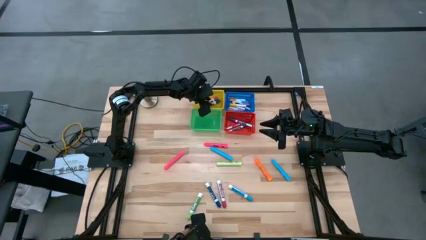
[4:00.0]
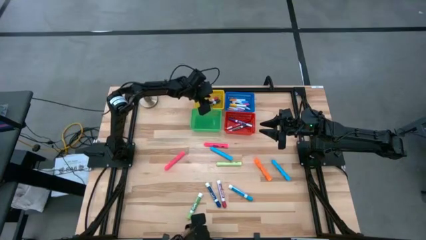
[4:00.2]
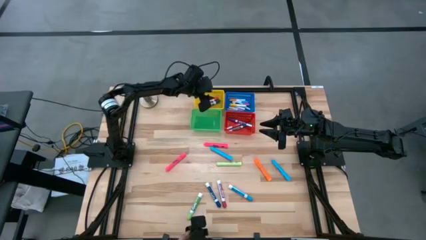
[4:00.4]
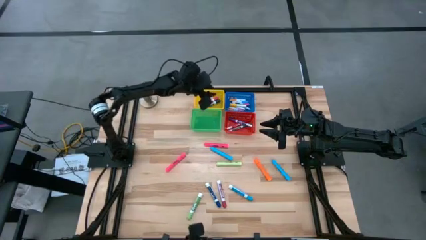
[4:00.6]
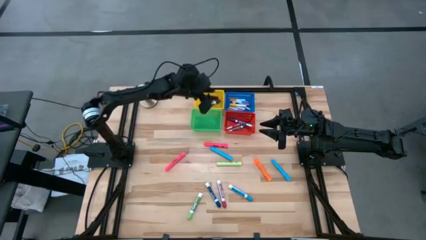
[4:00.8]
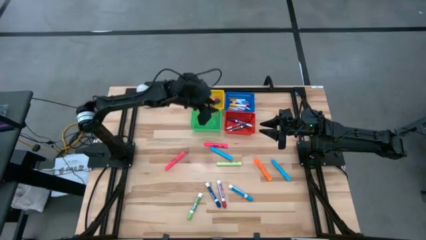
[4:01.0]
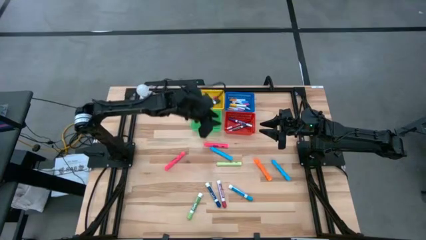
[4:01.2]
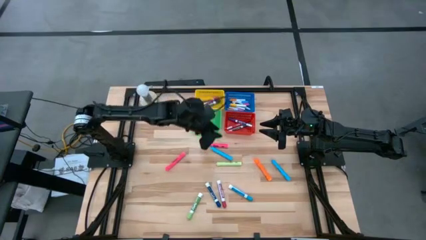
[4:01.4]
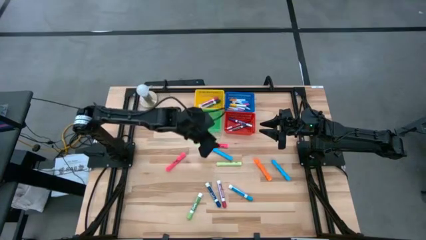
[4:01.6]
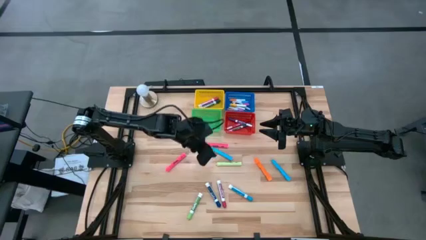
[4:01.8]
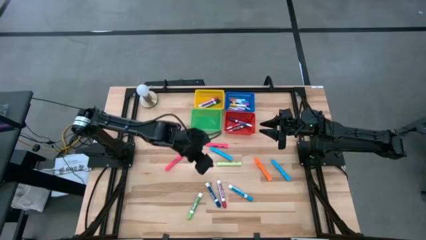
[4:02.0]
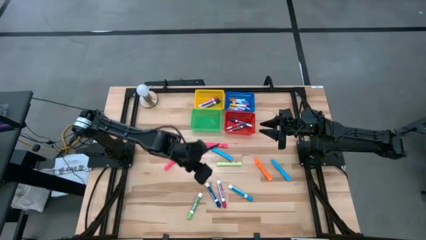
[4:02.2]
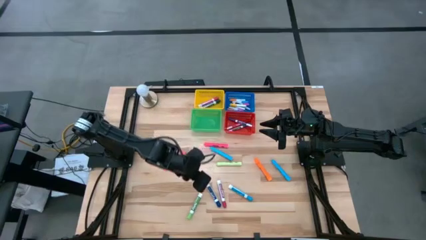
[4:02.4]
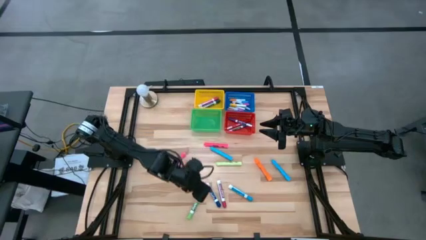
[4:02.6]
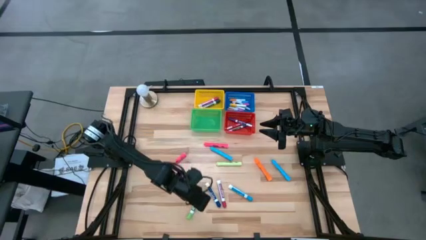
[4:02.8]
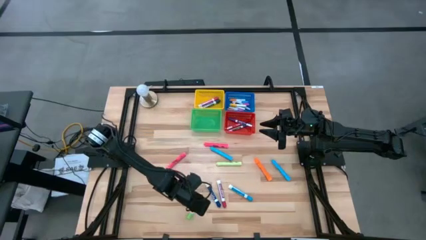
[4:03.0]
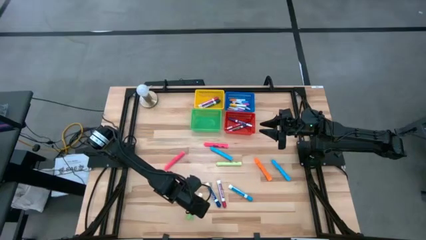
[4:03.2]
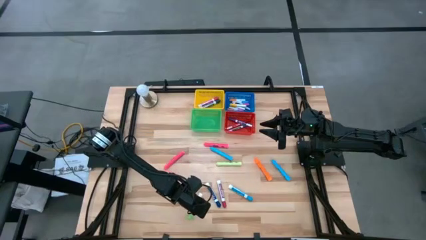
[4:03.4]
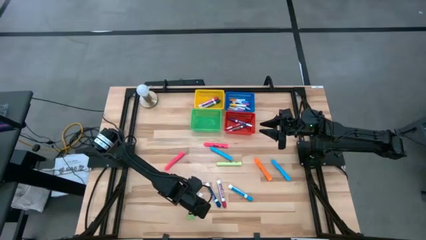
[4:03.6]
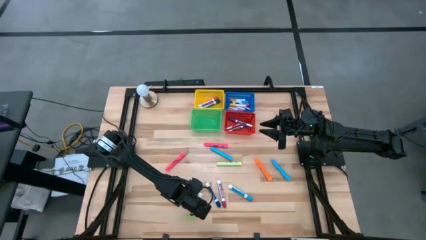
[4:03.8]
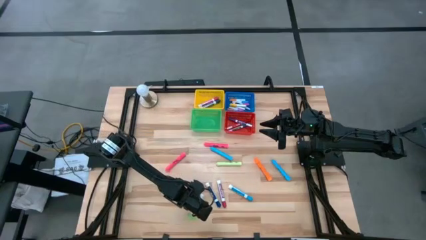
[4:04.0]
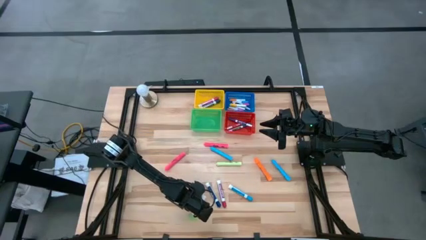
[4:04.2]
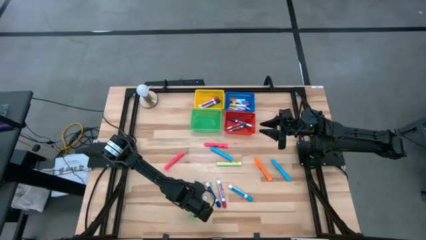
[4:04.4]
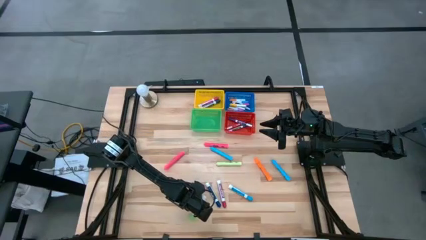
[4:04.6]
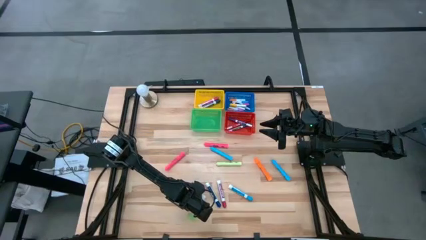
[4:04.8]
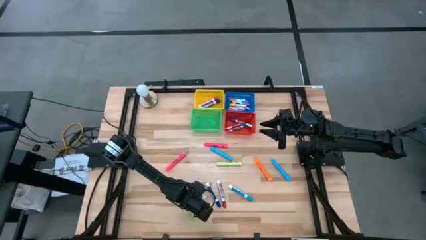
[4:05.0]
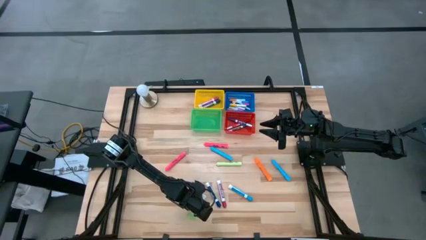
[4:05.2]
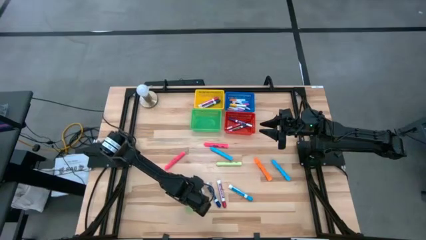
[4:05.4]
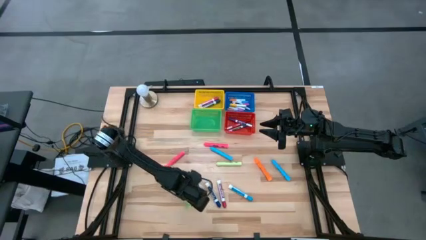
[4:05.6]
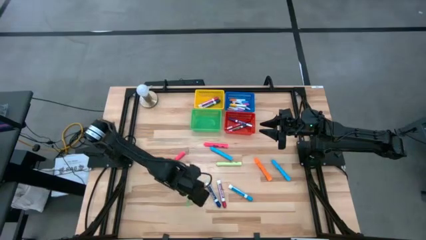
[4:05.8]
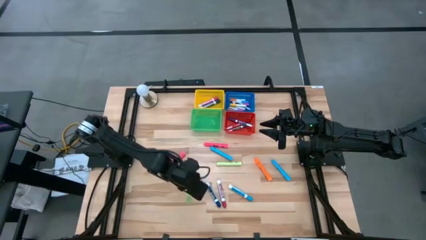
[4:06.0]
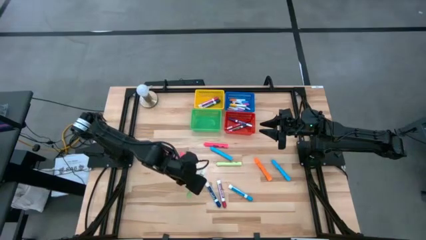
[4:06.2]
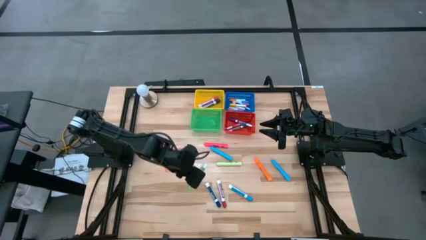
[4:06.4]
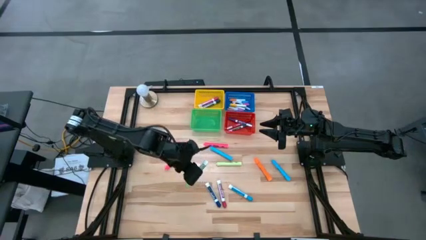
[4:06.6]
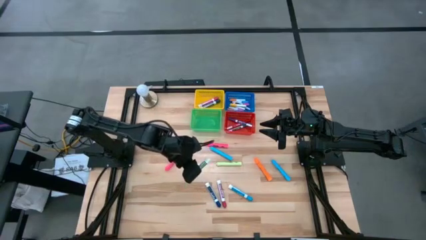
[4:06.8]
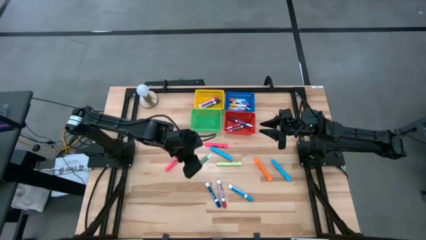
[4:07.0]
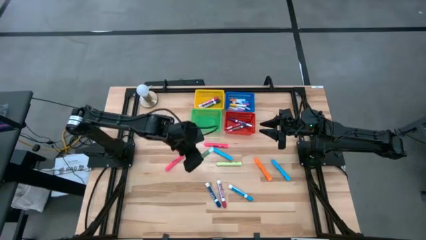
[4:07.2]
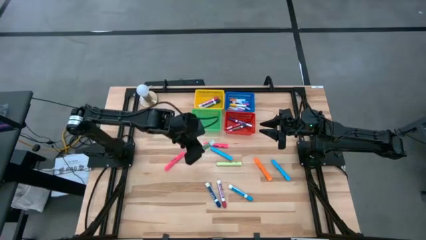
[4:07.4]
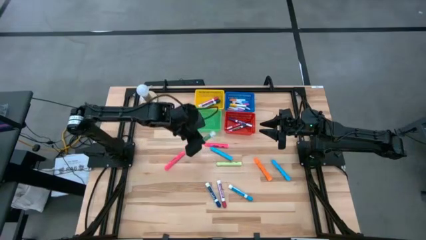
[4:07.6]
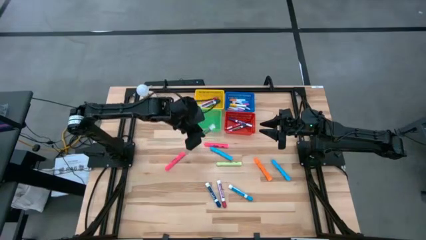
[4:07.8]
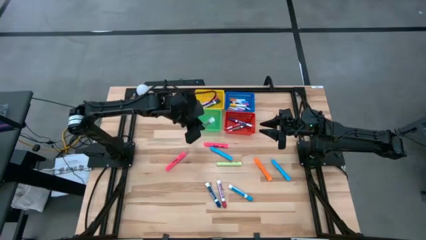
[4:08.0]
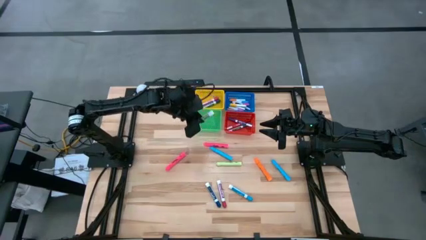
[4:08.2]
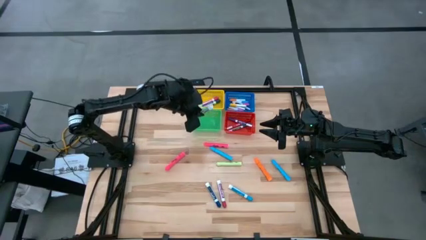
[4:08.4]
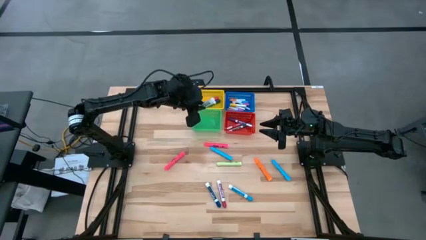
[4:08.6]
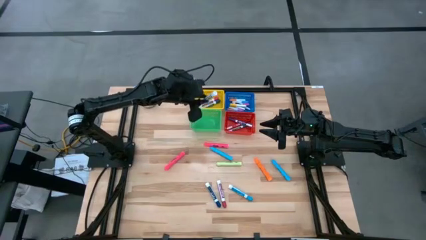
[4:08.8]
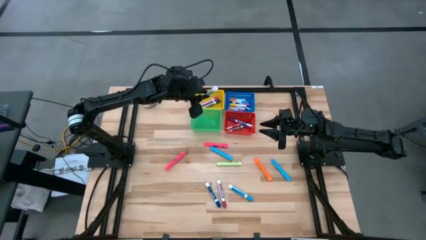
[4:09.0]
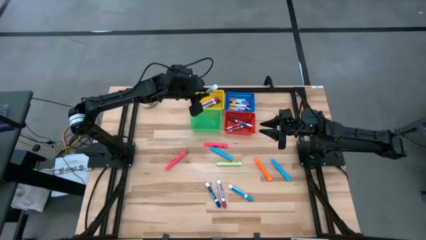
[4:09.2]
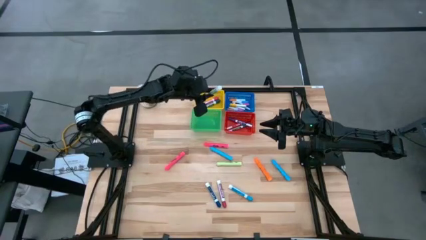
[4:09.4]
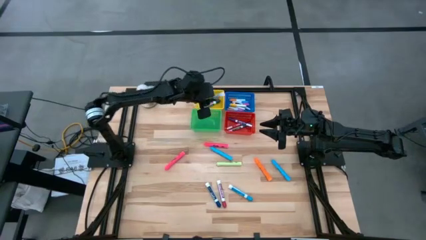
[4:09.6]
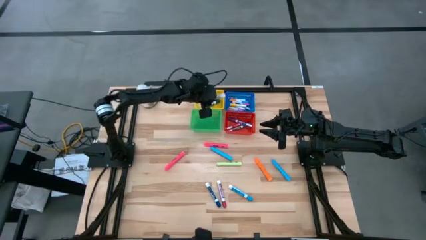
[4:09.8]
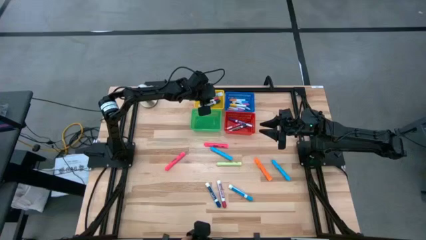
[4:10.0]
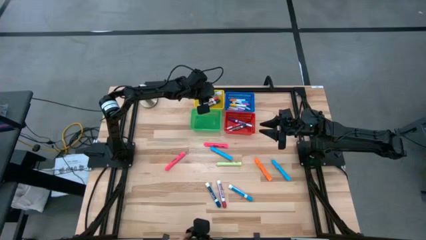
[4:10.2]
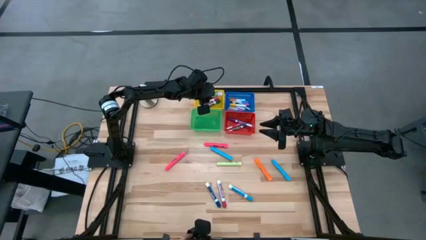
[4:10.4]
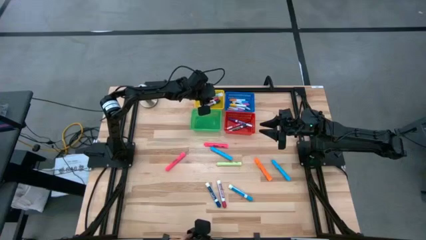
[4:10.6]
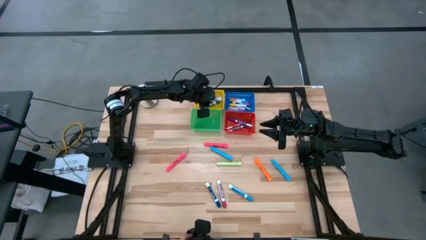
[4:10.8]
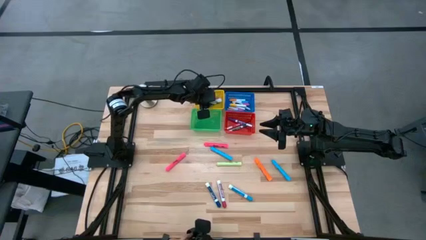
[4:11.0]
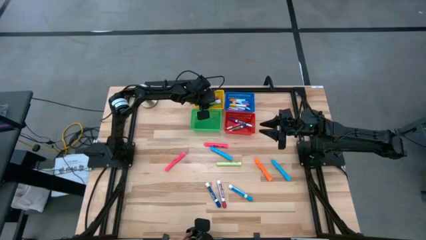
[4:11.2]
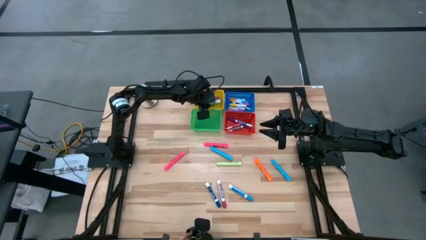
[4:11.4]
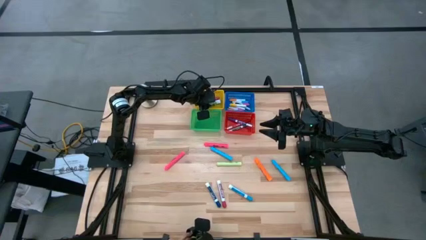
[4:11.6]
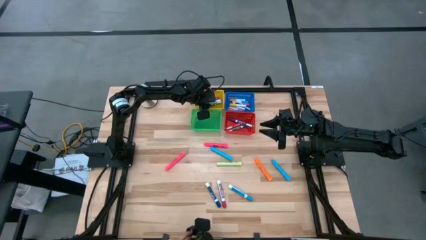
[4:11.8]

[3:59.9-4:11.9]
Task: Pick & Place Markers
Put the large light green marker pen into the yellow bin
